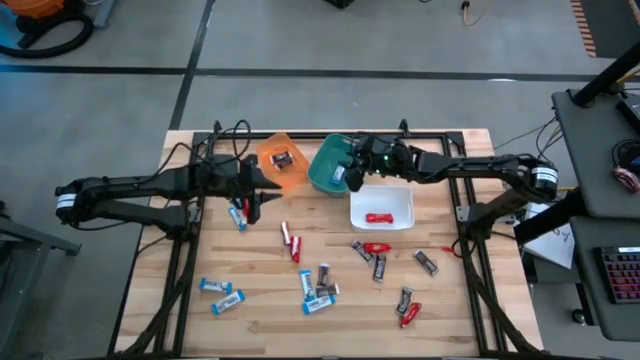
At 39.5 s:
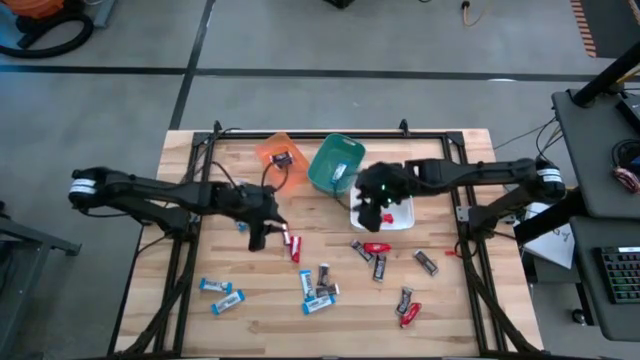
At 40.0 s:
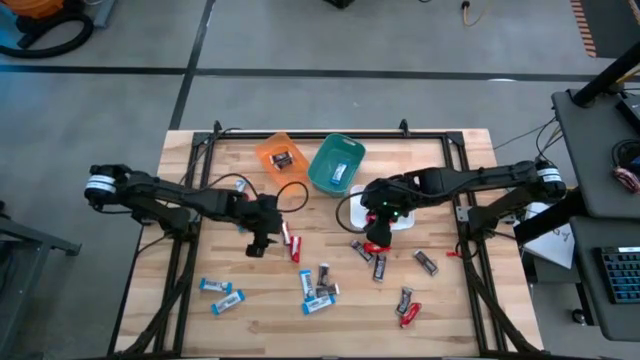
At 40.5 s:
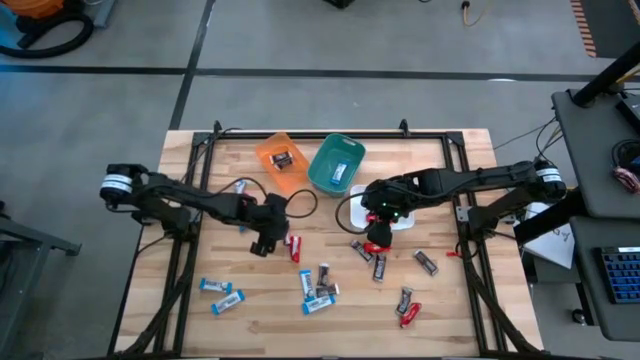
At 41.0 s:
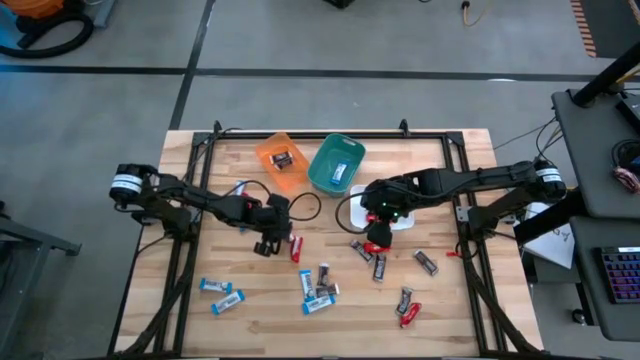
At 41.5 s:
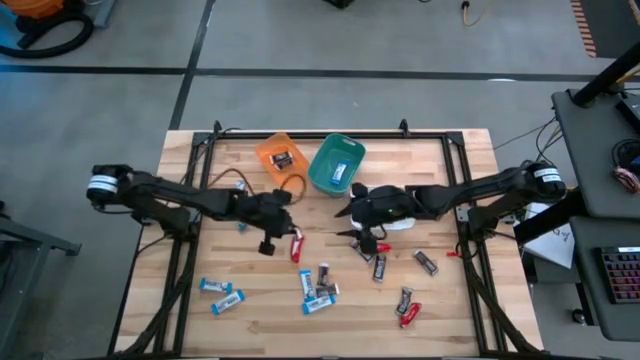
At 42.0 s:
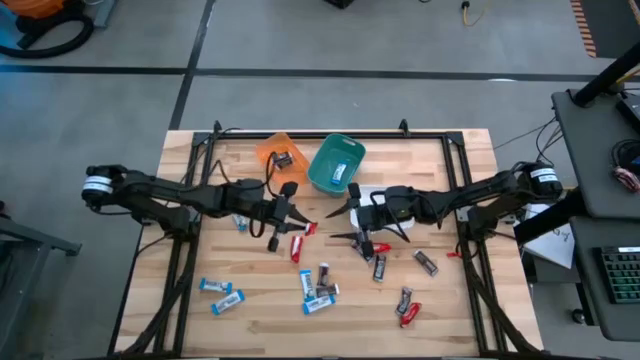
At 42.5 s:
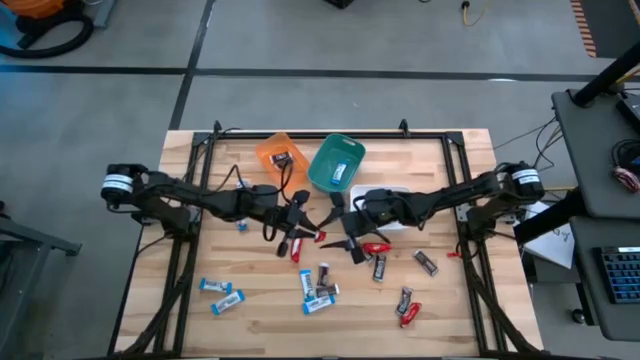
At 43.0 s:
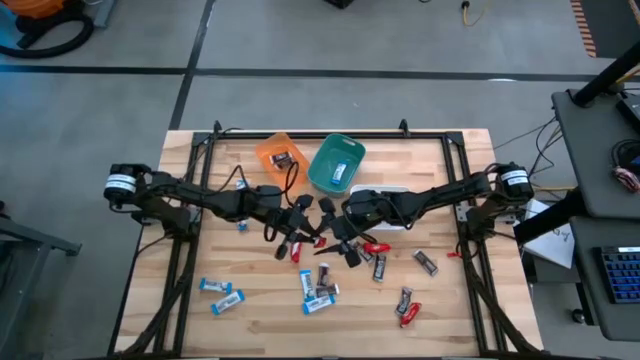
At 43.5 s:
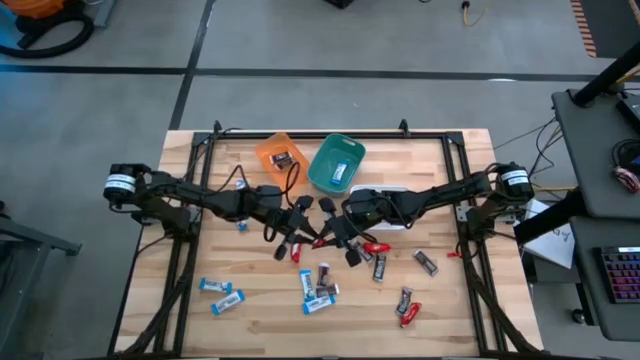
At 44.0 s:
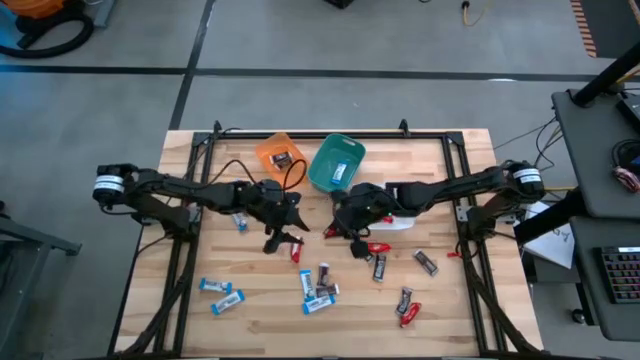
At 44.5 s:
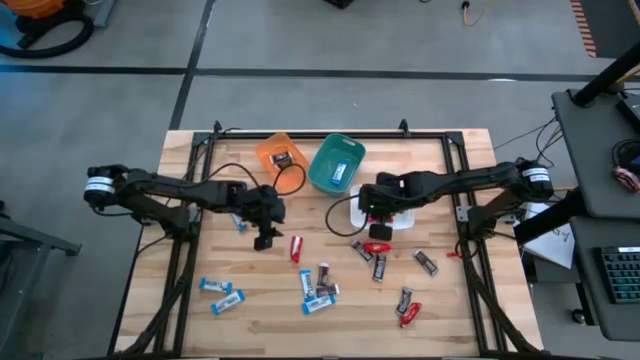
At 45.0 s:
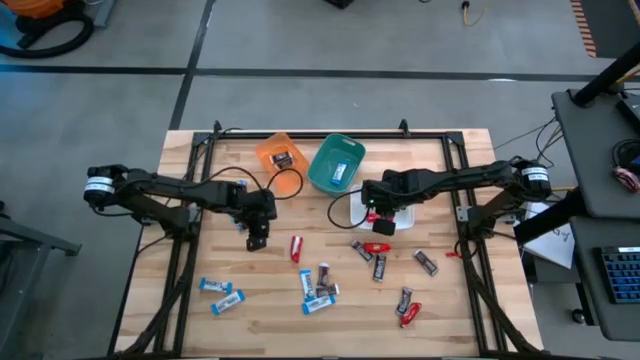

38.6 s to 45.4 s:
Task: Sort candy
Put the red chocolate bar into the white bin

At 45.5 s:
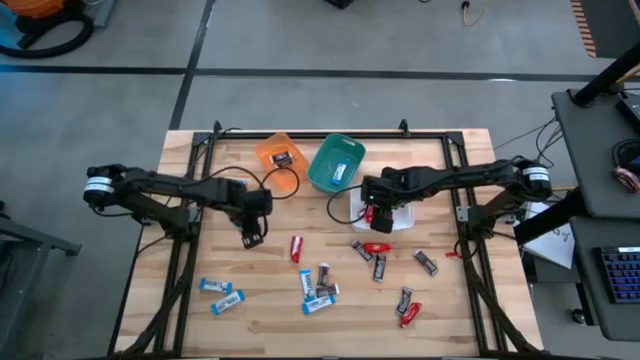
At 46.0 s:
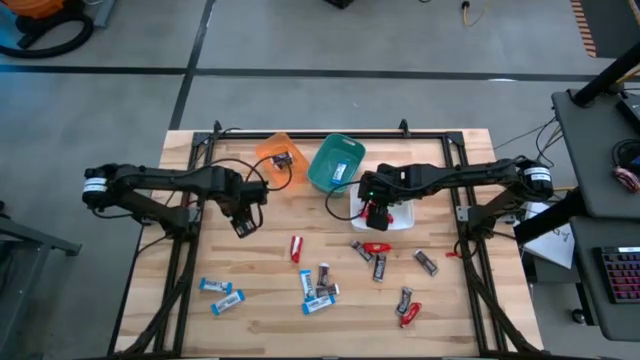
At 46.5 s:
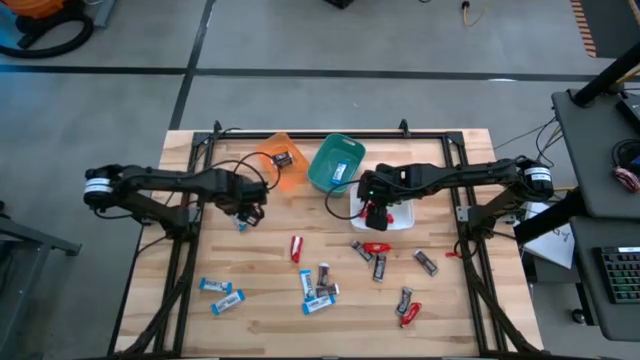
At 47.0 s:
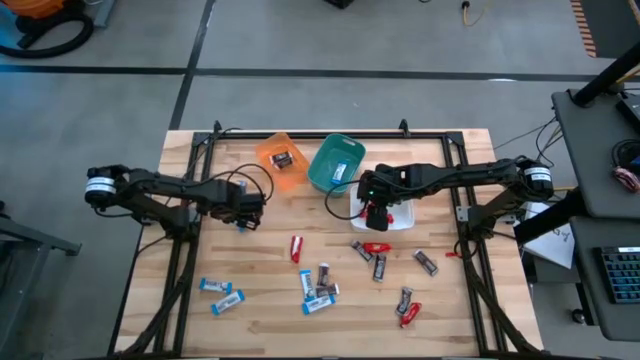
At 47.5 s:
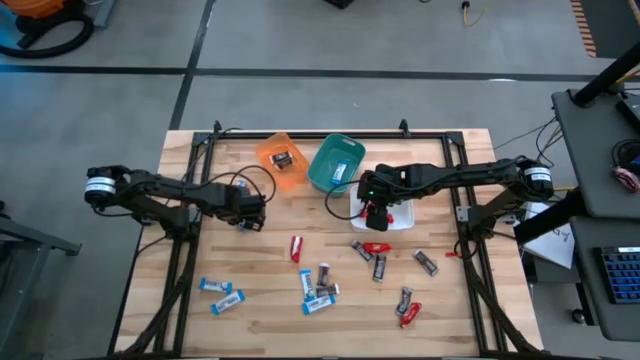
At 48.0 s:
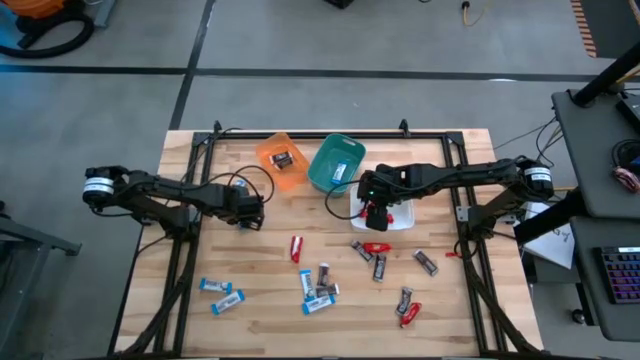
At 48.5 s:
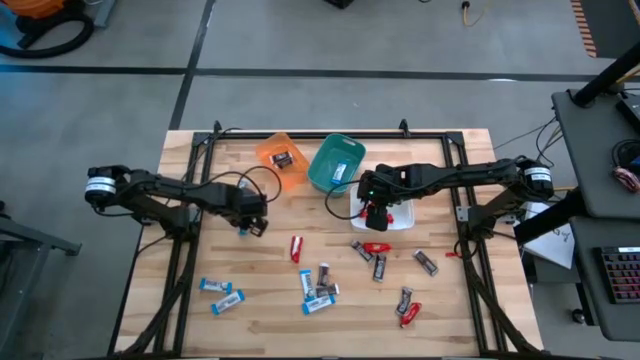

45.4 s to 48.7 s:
Put the white chocolate bar into the green bin

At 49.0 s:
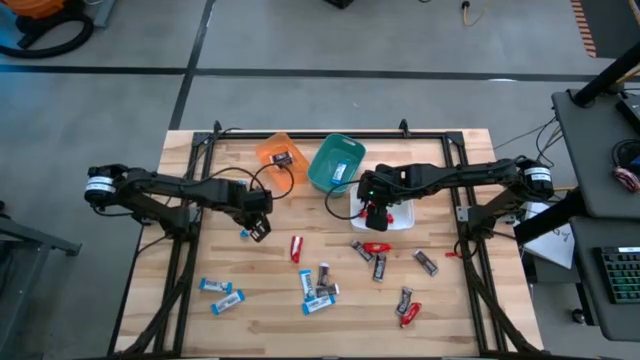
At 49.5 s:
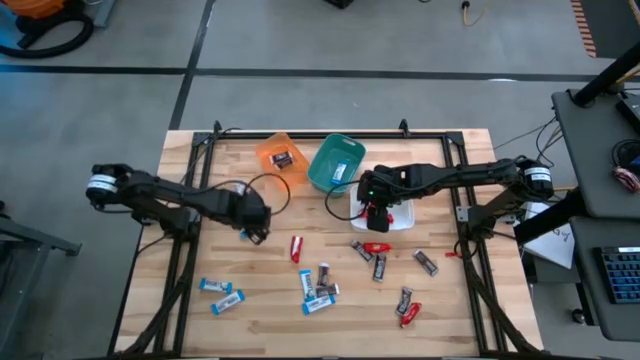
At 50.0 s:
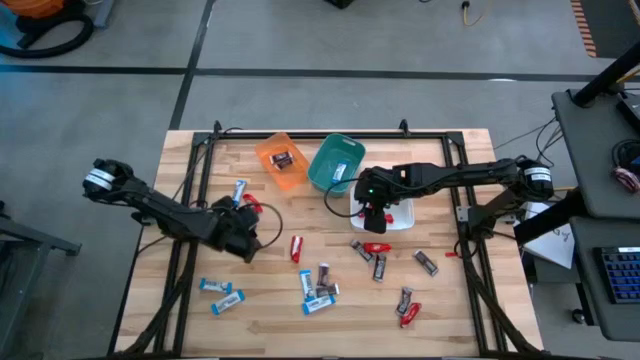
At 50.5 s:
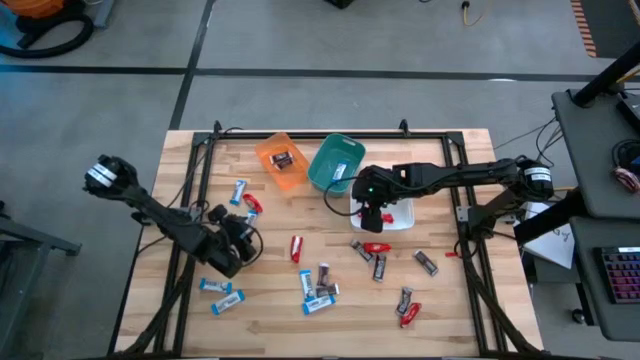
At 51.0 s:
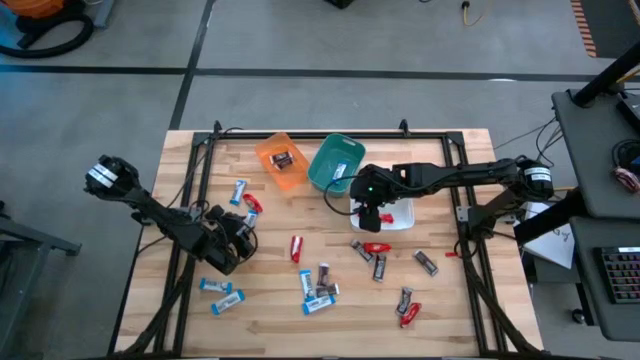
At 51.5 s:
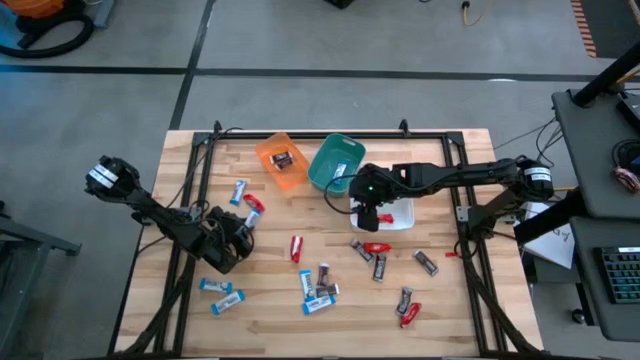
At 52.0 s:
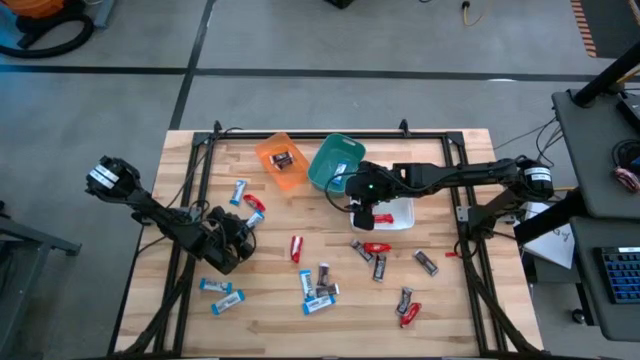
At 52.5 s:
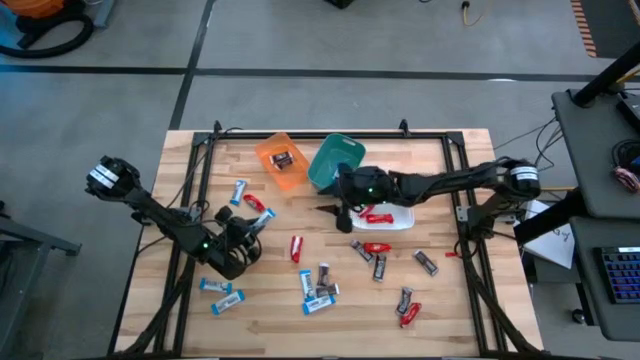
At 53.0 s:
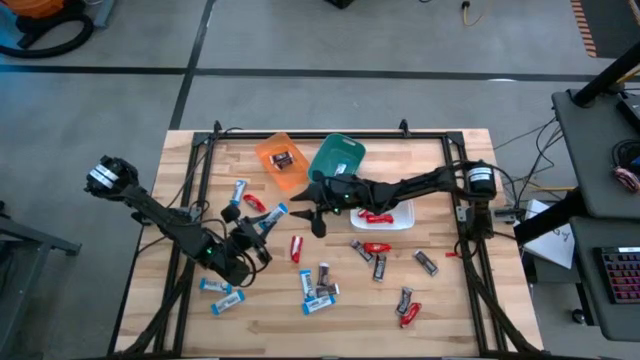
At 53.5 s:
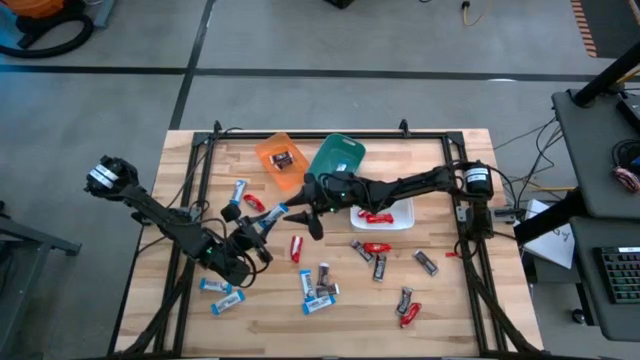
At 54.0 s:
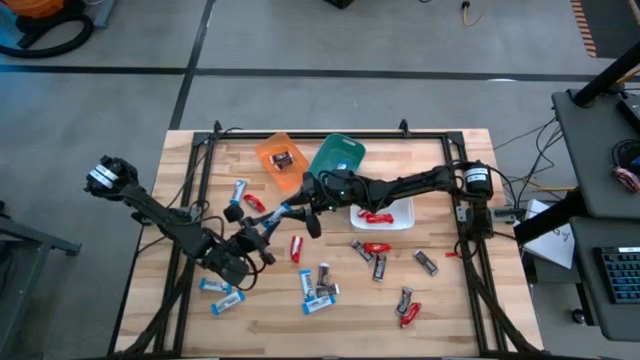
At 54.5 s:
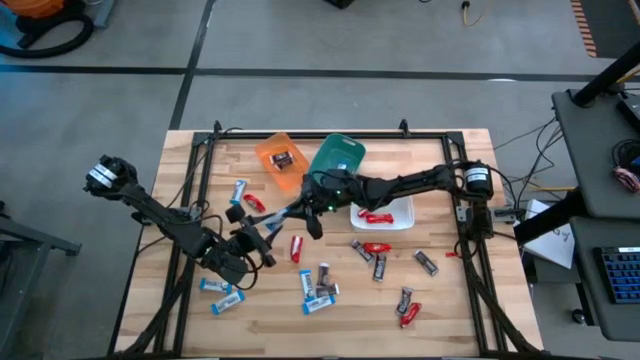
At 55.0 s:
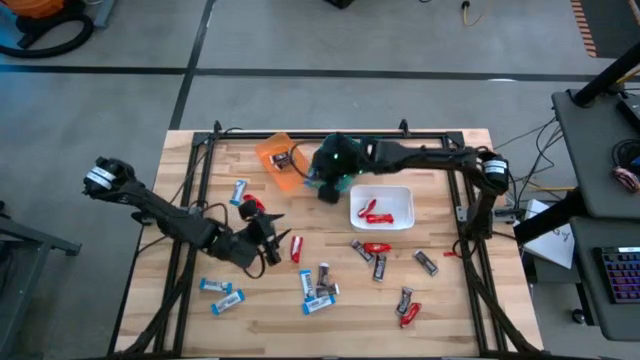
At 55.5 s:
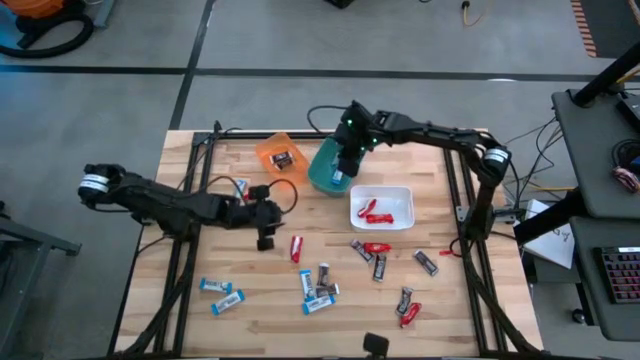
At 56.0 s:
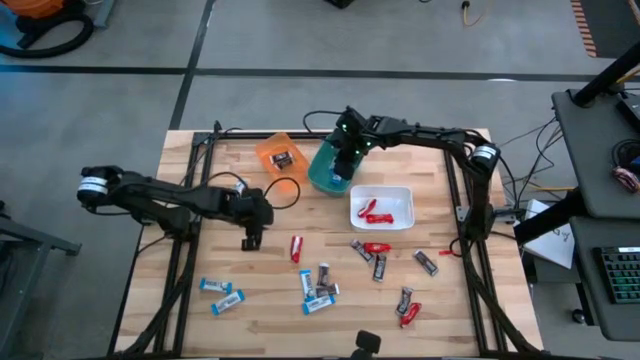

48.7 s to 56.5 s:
Put the white chocolate bar into the green bin

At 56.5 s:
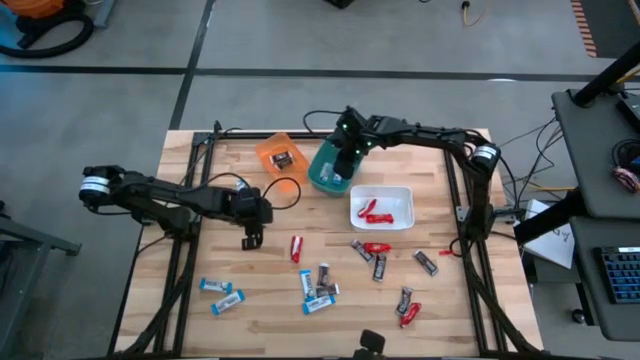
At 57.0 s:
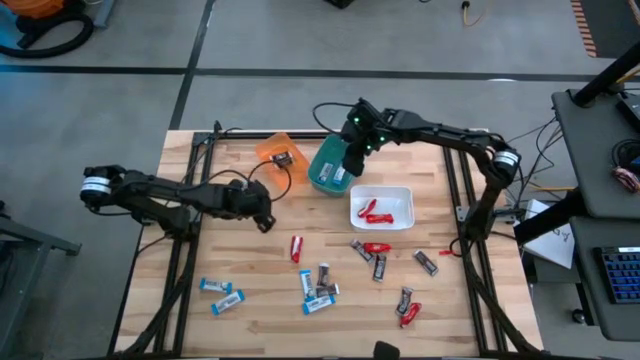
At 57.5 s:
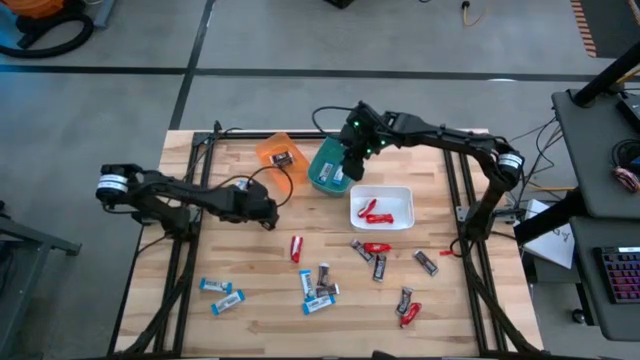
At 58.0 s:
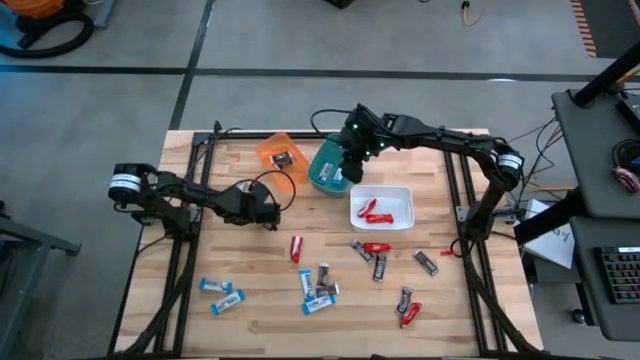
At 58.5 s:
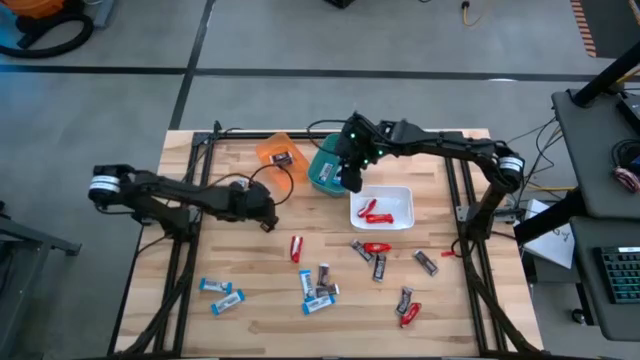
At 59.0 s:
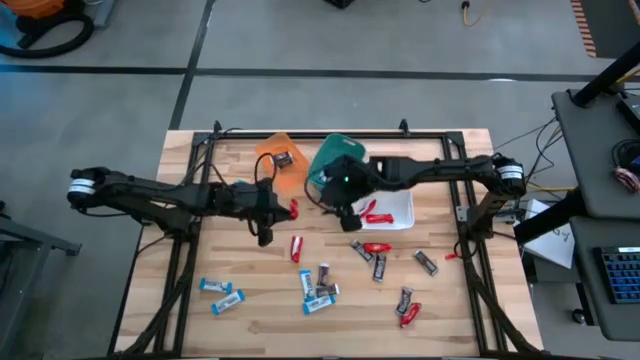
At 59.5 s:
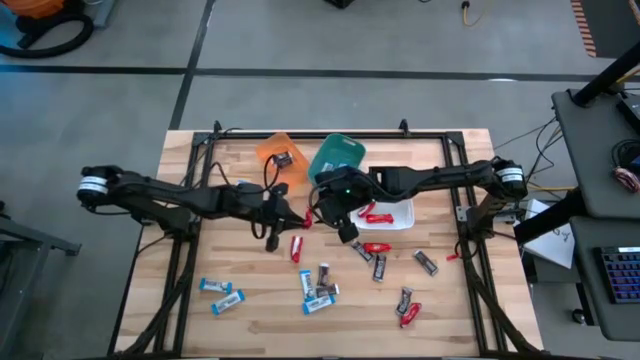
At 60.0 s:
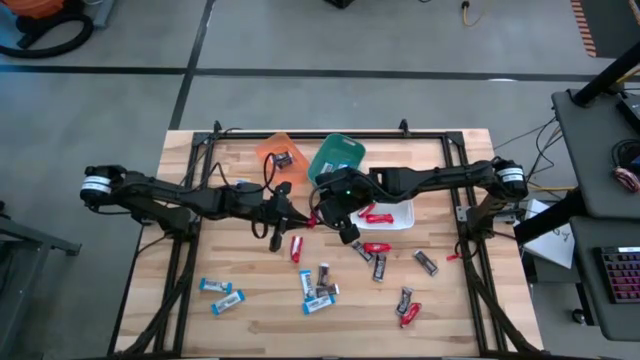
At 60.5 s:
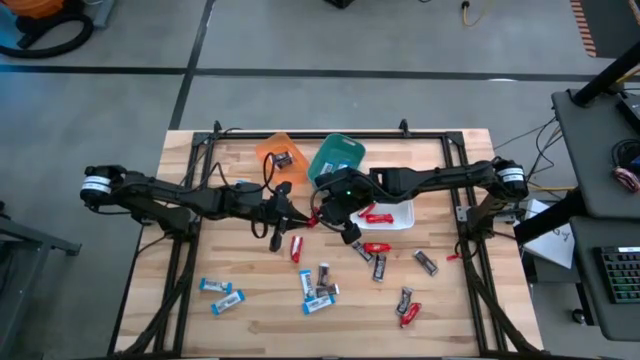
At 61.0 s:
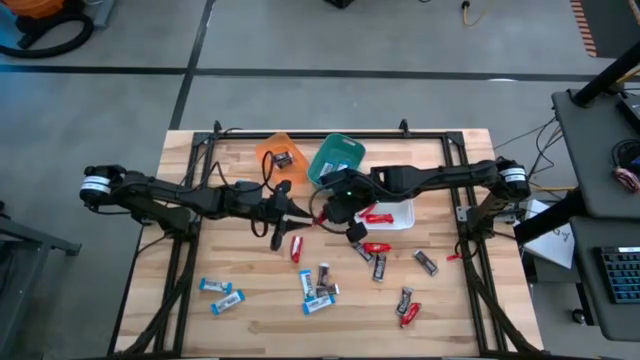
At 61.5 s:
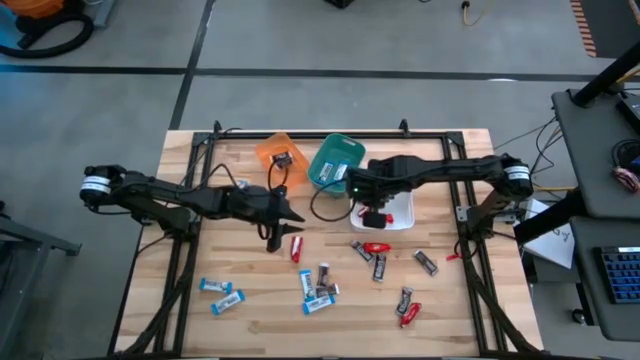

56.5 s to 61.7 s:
Put the red chocolate bar into the white bin
